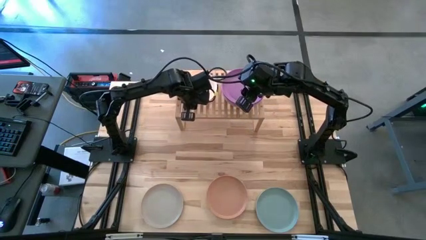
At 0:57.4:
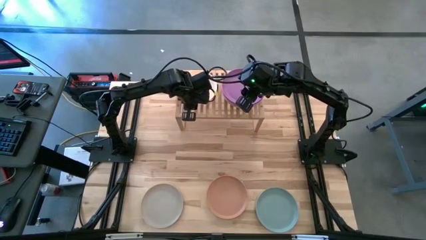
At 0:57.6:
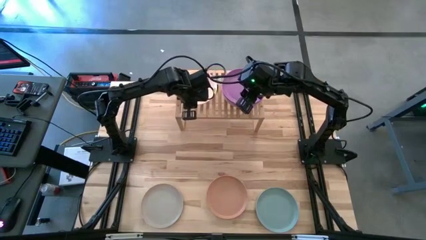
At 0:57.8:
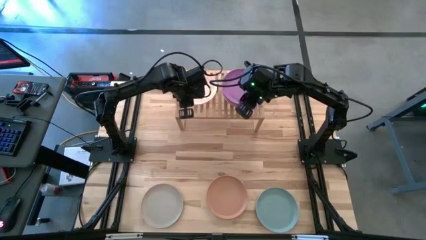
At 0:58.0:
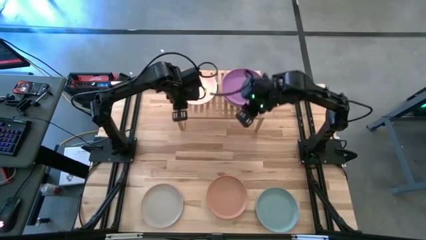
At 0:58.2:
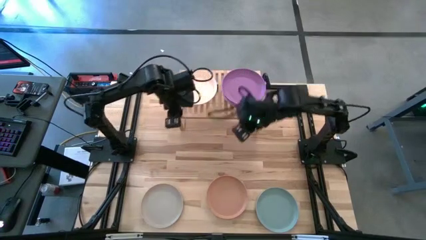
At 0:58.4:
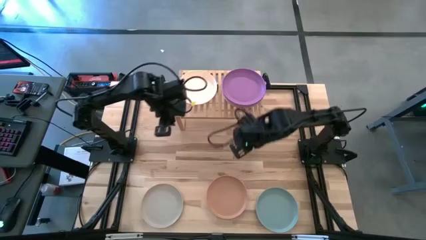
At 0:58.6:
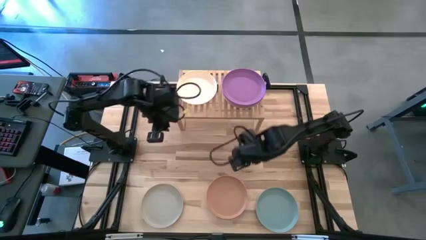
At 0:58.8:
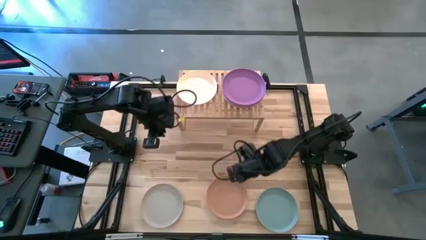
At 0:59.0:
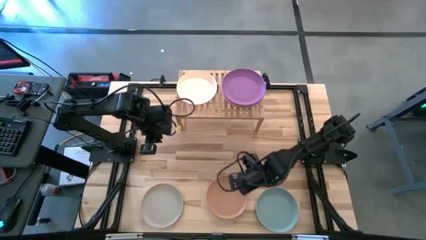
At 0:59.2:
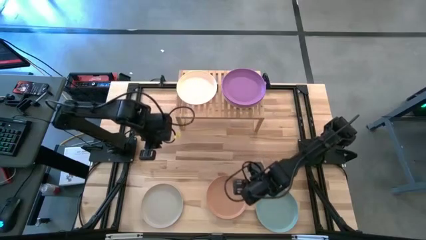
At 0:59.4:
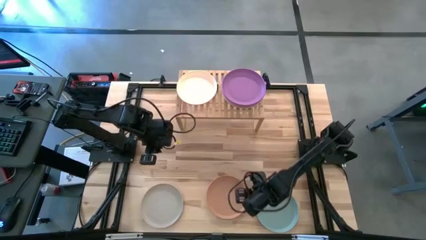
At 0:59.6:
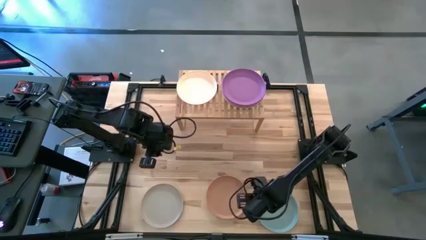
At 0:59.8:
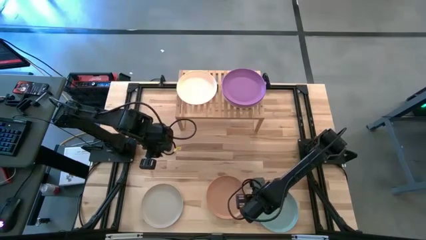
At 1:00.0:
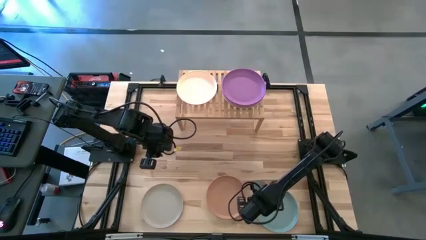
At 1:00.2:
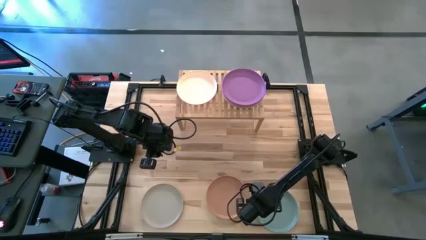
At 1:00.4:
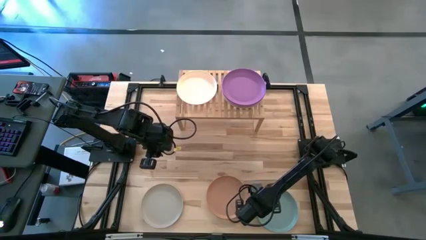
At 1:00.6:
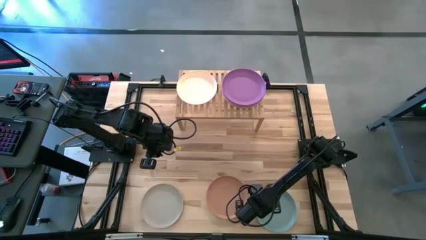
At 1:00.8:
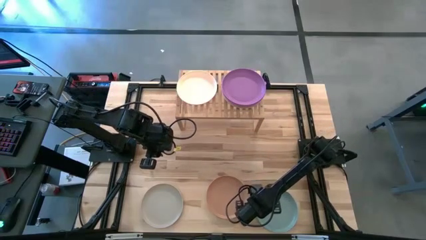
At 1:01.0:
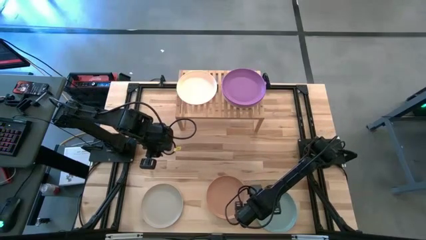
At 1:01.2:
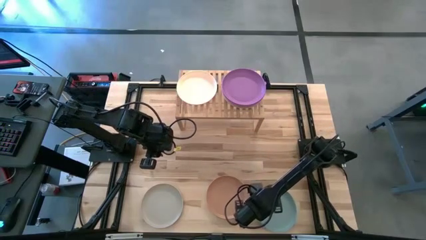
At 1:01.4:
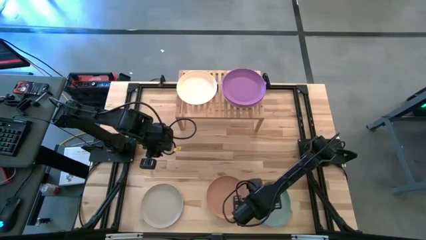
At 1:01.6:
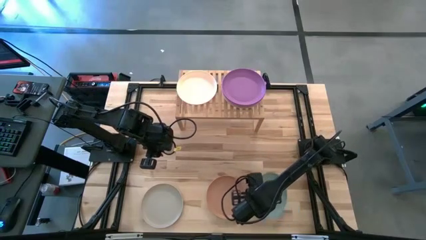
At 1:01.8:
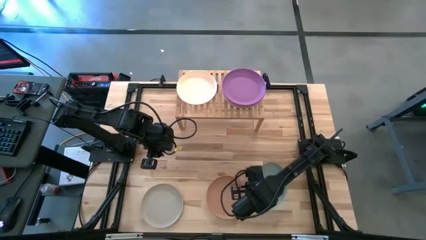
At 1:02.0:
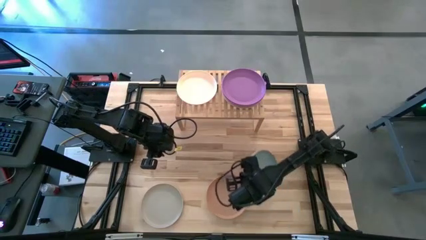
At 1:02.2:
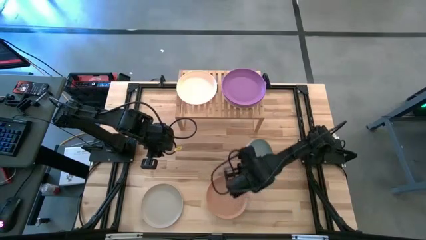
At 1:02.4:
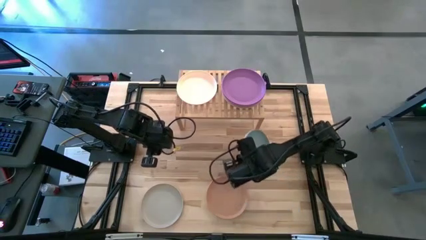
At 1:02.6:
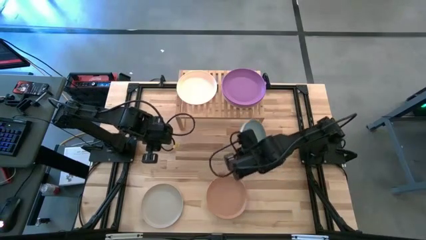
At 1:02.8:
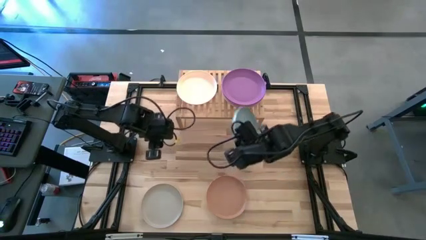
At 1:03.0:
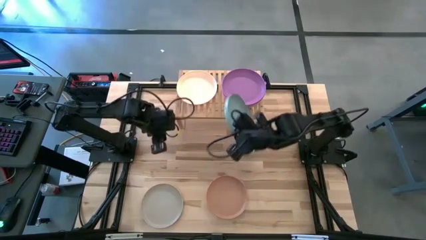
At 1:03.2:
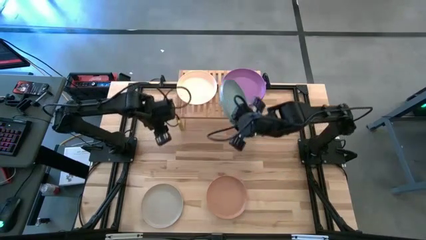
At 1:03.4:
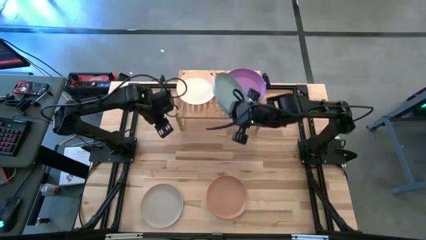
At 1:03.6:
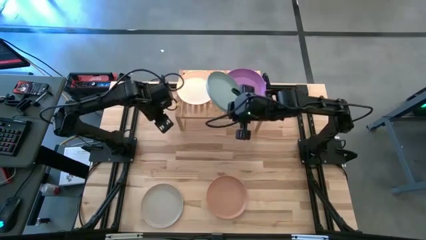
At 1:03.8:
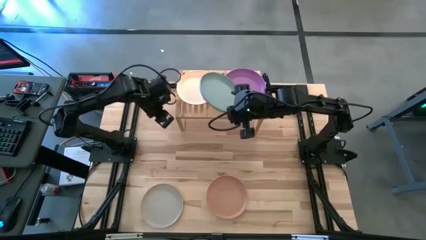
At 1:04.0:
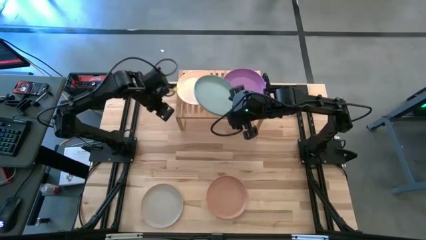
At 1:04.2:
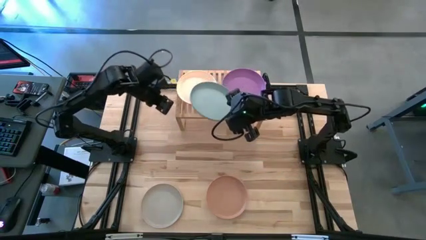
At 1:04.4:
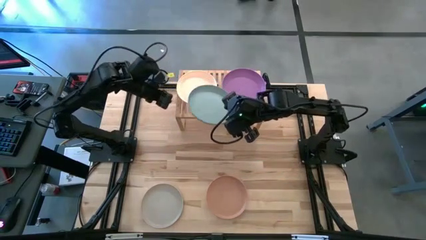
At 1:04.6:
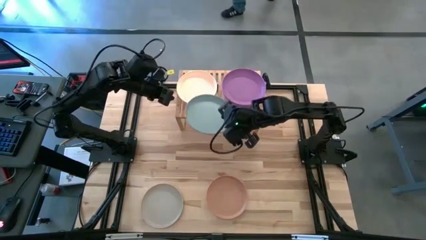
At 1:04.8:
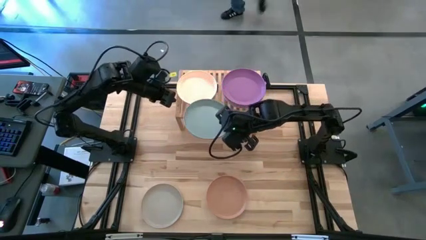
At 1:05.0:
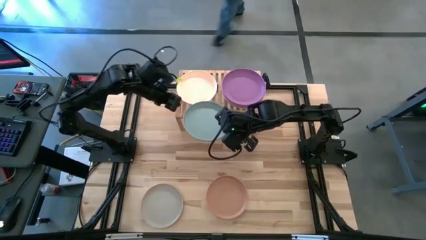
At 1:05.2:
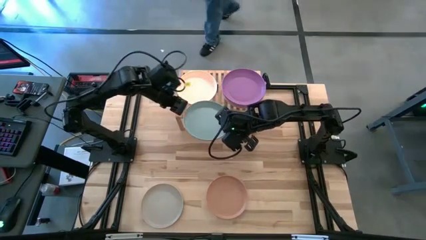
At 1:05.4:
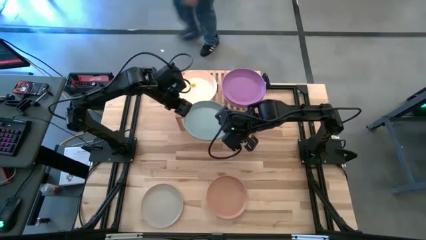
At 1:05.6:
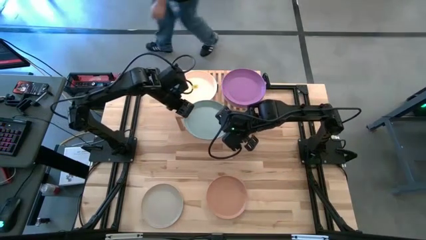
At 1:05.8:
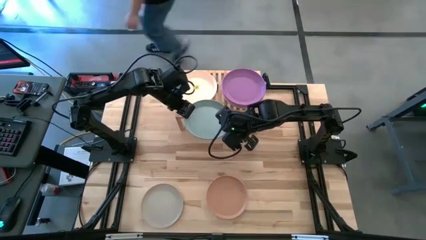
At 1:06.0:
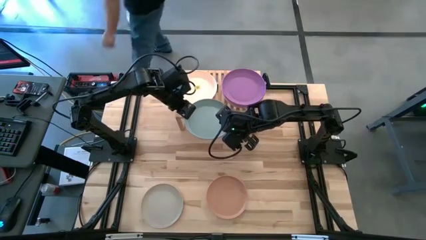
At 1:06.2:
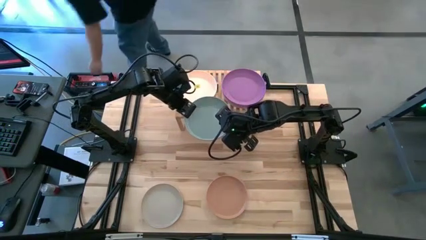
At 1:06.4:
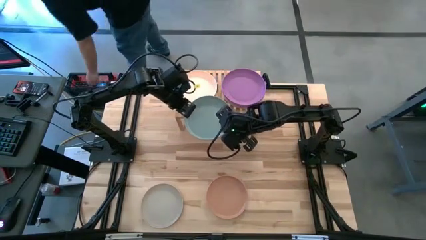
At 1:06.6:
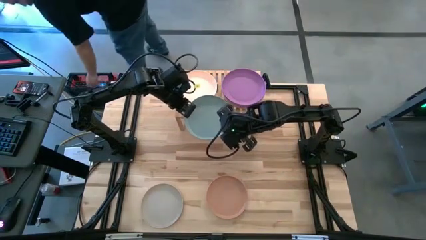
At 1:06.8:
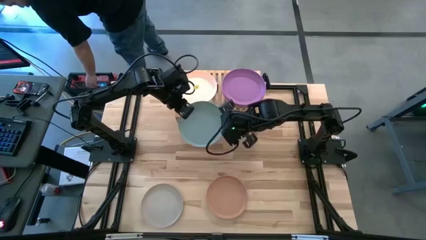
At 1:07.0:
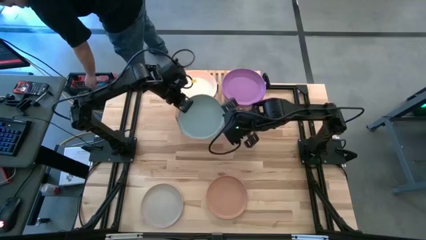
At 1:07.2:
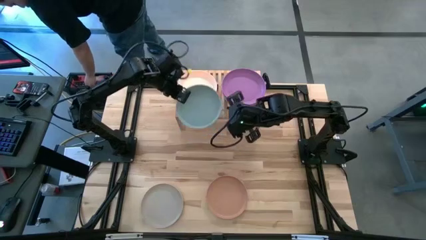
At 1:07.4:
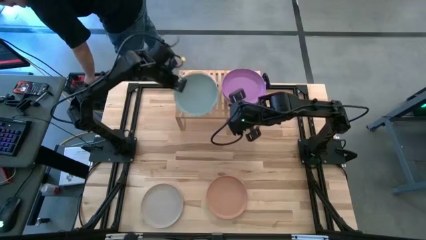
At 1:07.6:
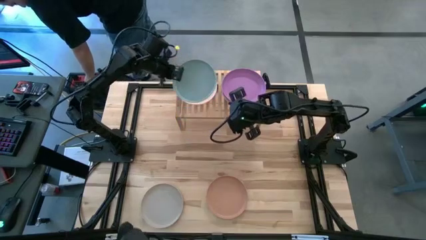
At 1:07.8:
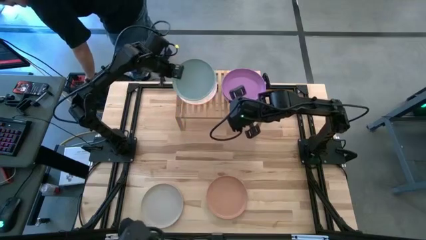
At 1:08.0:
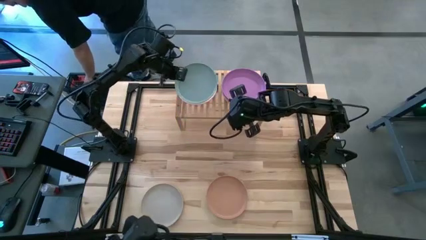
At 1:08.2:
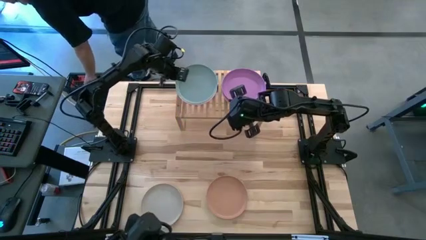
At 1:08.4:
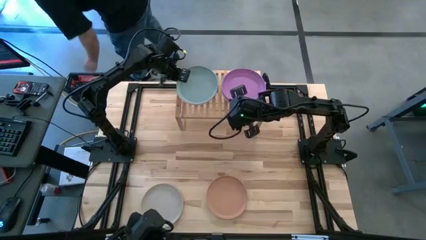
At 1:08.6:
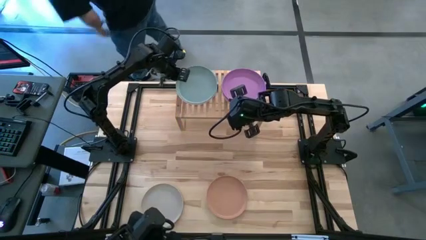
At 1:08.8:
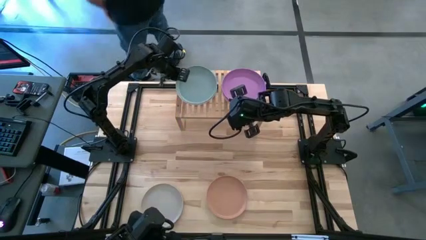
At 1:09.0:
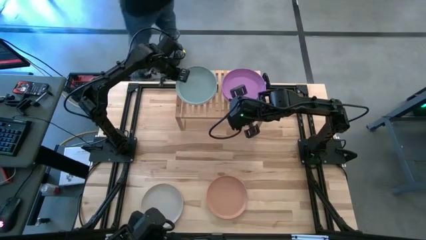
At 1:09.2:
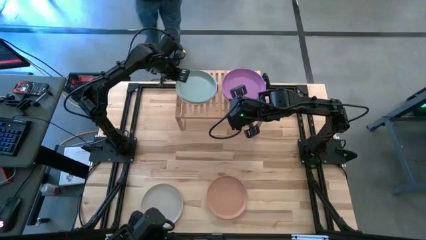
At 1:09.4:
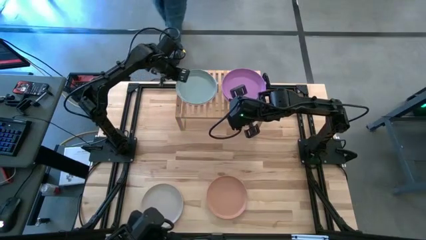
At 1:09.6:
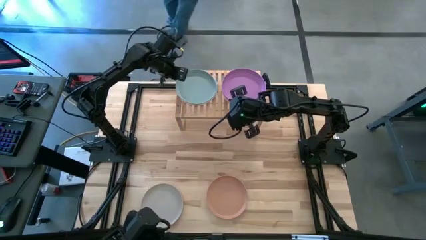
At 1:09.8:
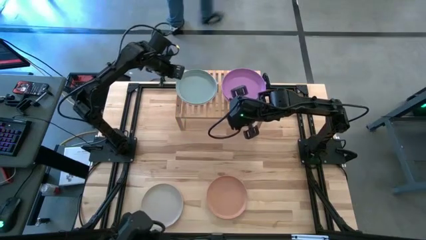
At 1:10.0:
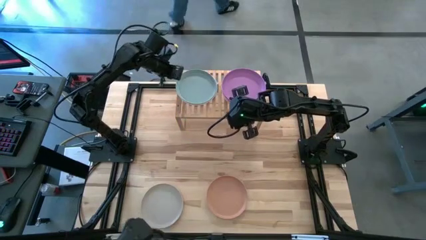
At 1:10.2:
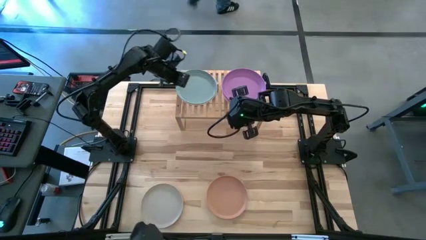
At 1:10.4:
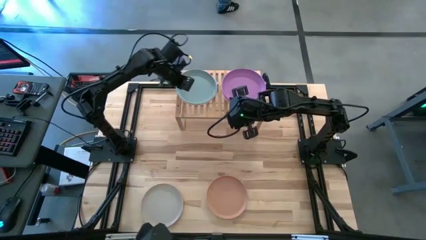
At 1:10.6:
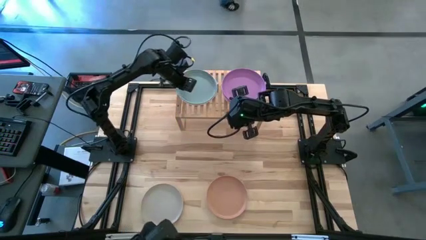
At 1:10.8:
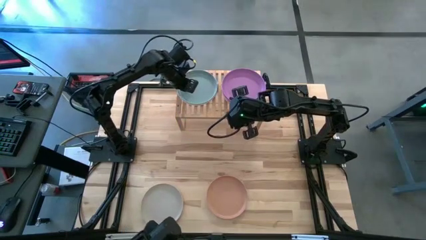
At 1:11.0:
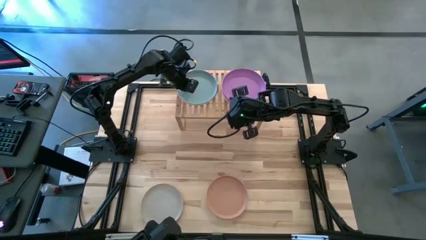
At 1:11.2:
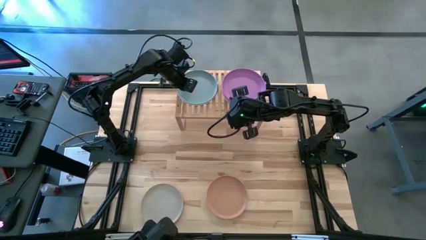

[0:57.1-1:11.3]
Task: Place and stack plates onto a shelf
Stack the light green plate on the light pink plate on the shelf
